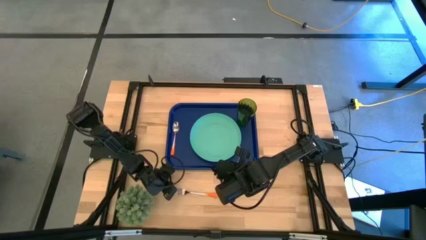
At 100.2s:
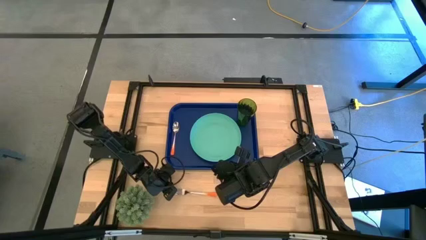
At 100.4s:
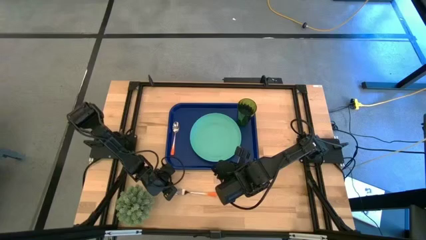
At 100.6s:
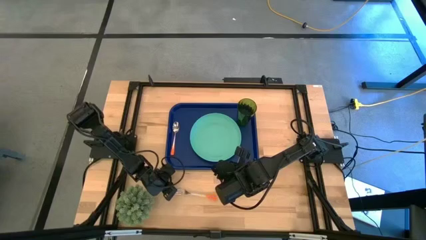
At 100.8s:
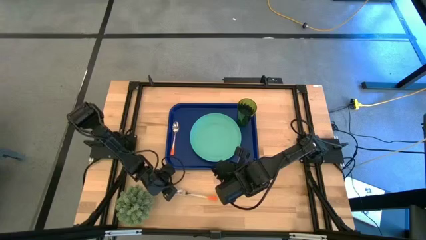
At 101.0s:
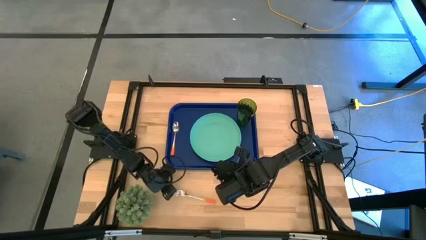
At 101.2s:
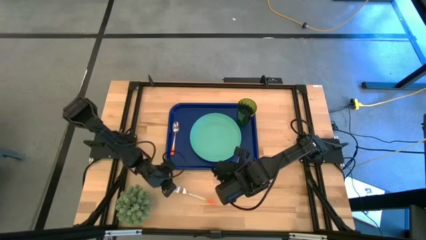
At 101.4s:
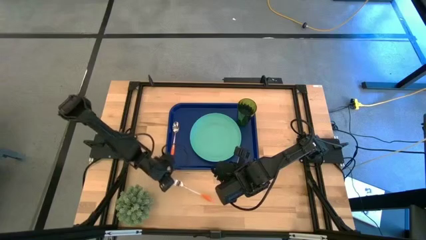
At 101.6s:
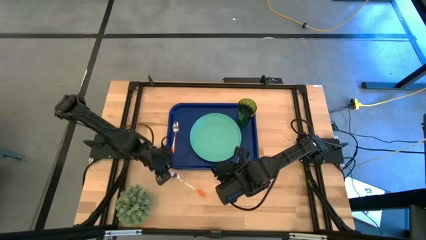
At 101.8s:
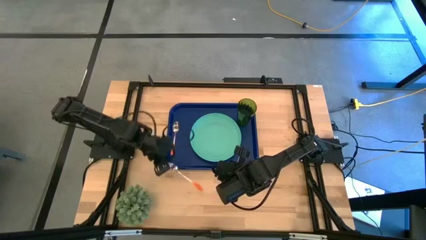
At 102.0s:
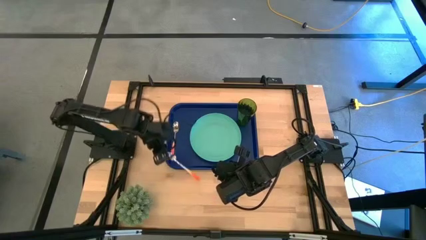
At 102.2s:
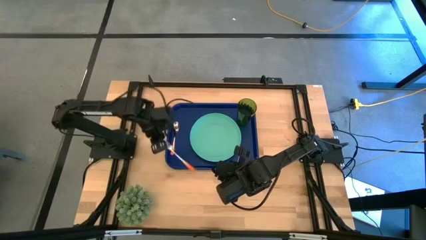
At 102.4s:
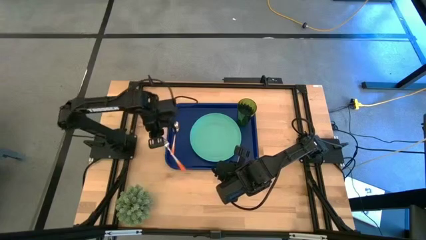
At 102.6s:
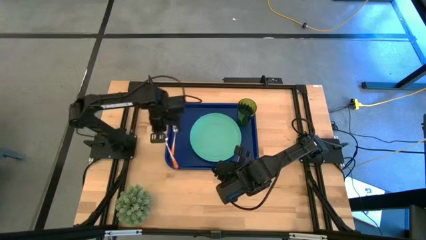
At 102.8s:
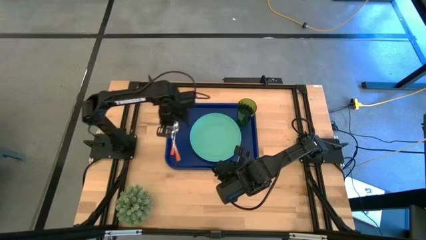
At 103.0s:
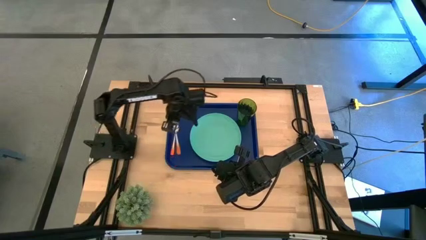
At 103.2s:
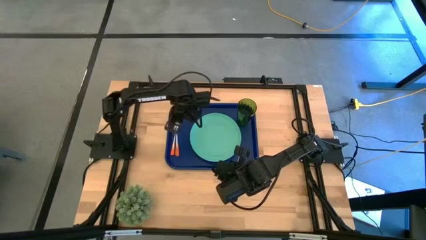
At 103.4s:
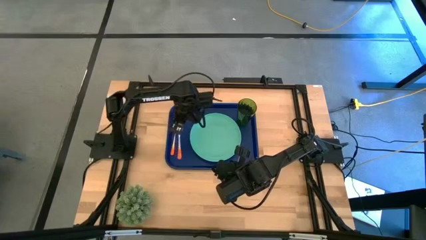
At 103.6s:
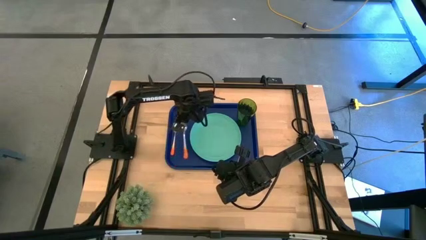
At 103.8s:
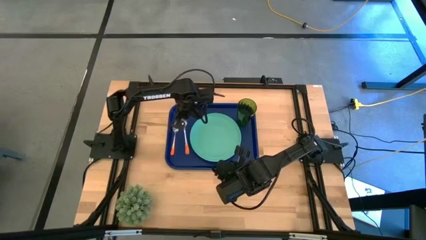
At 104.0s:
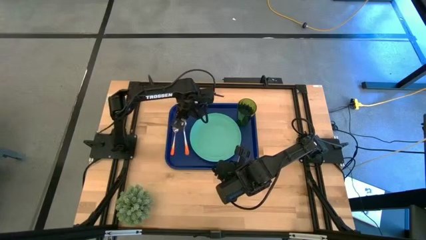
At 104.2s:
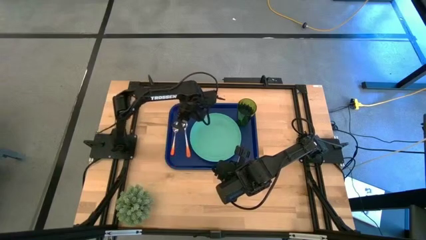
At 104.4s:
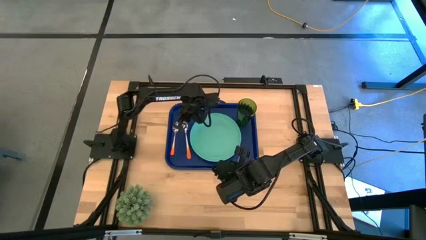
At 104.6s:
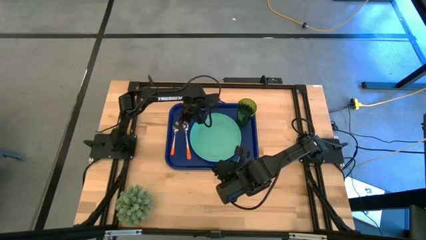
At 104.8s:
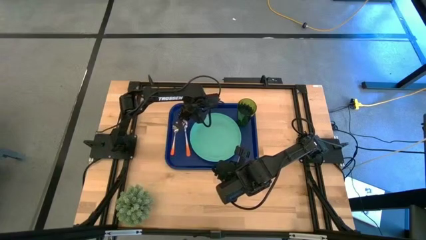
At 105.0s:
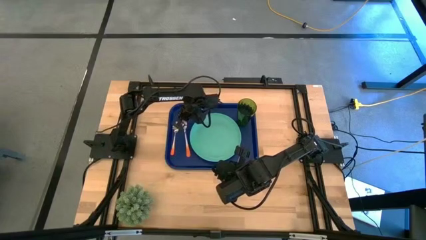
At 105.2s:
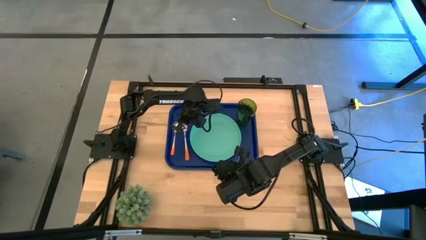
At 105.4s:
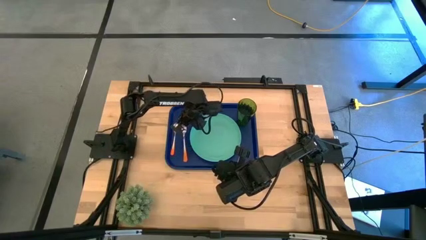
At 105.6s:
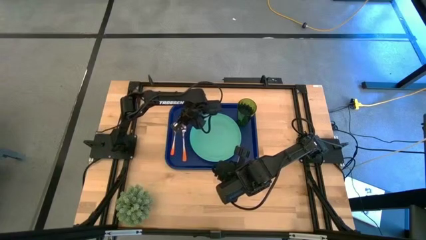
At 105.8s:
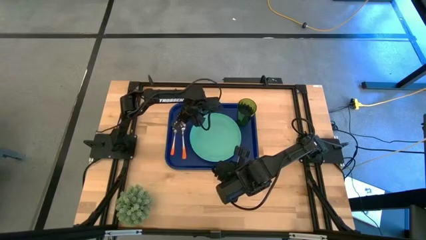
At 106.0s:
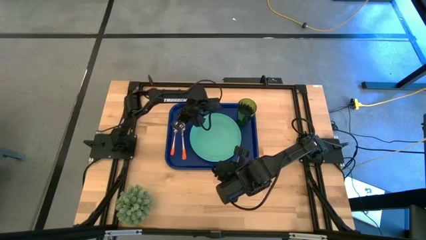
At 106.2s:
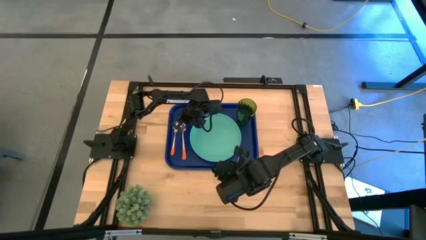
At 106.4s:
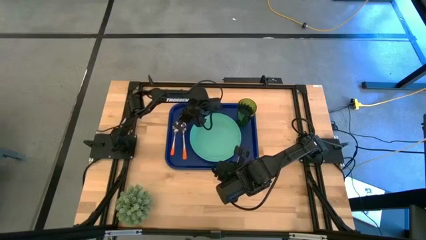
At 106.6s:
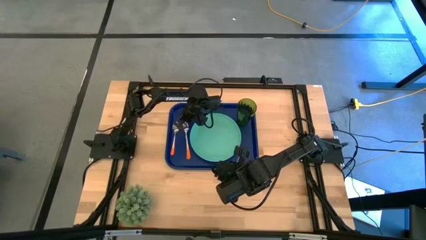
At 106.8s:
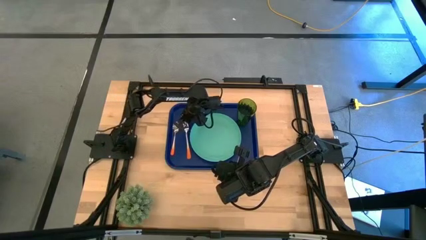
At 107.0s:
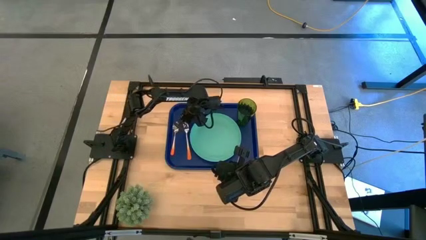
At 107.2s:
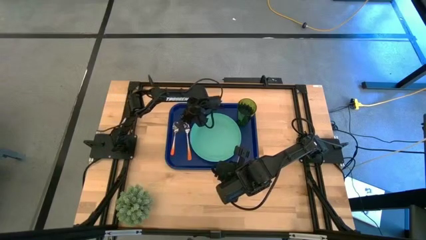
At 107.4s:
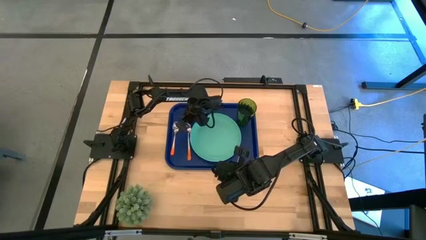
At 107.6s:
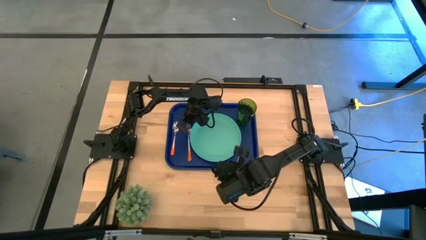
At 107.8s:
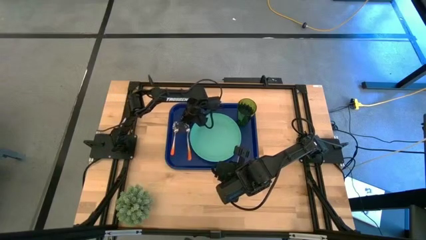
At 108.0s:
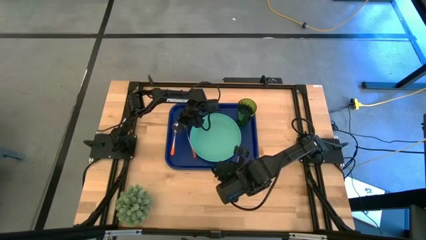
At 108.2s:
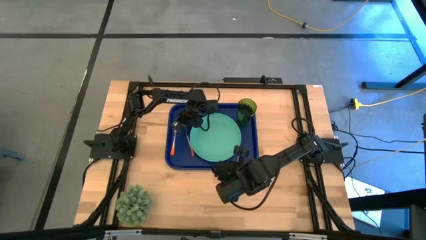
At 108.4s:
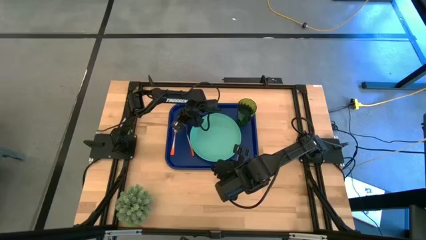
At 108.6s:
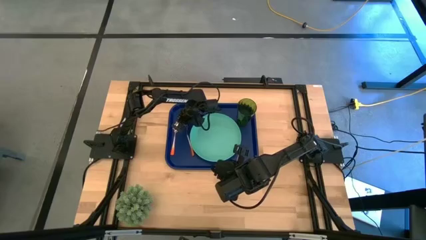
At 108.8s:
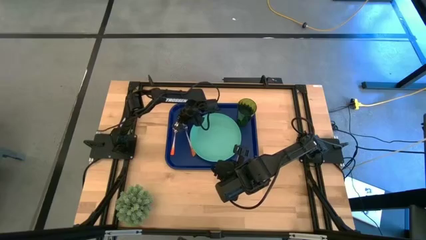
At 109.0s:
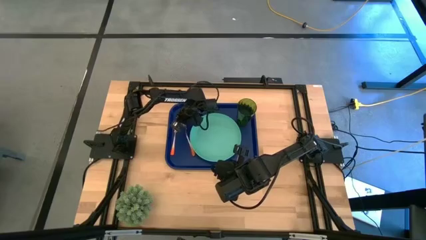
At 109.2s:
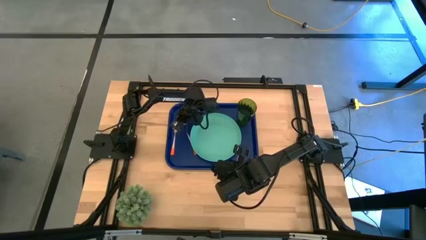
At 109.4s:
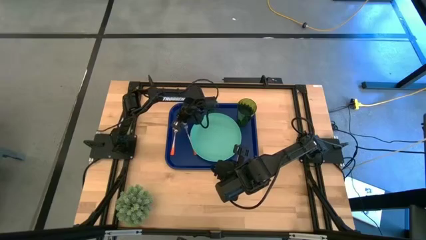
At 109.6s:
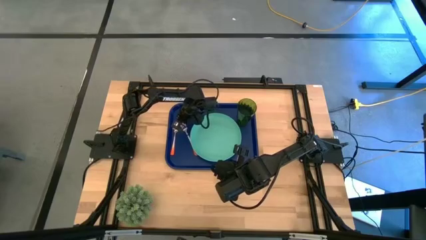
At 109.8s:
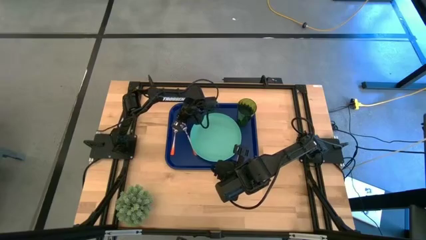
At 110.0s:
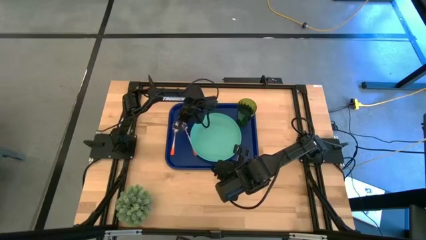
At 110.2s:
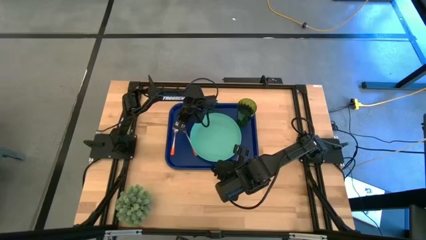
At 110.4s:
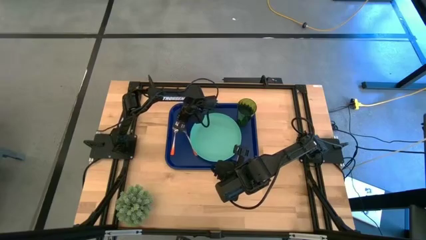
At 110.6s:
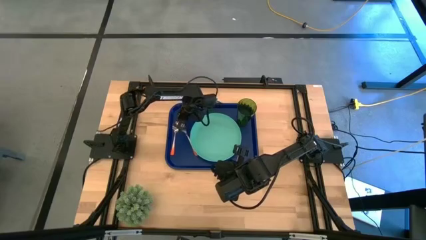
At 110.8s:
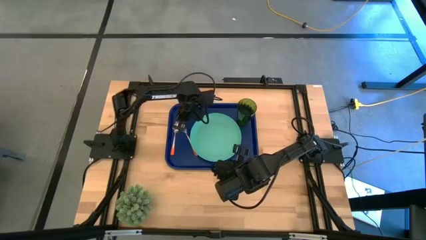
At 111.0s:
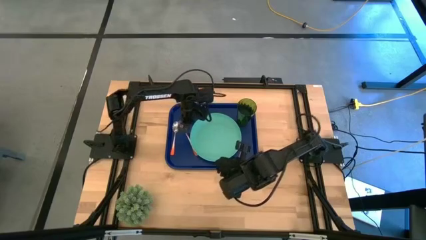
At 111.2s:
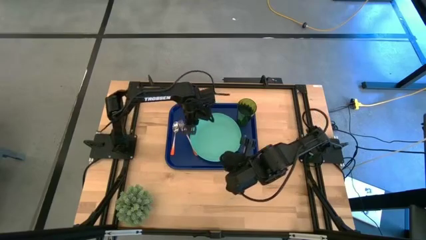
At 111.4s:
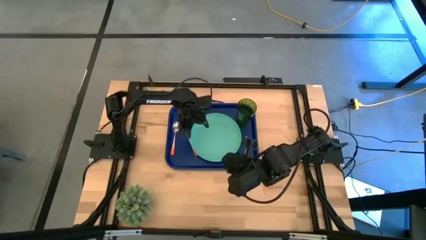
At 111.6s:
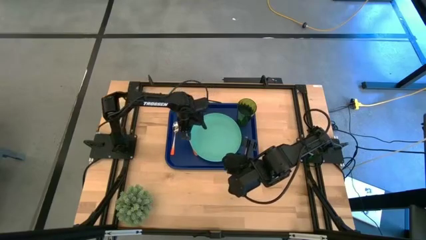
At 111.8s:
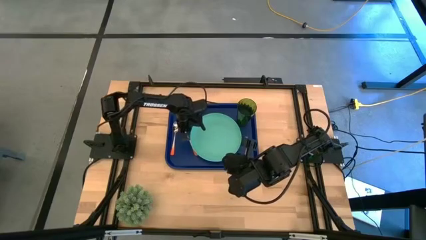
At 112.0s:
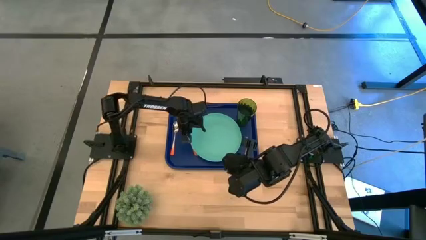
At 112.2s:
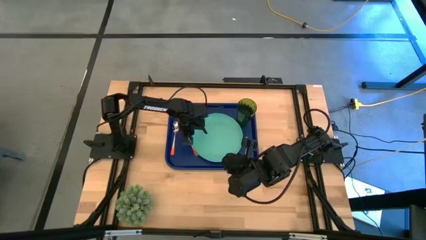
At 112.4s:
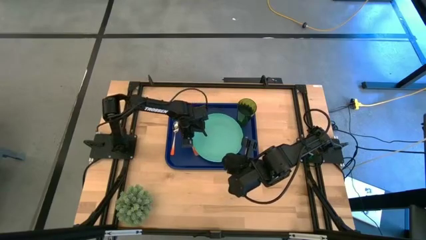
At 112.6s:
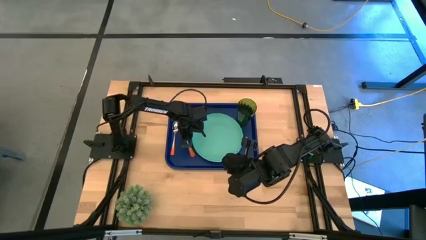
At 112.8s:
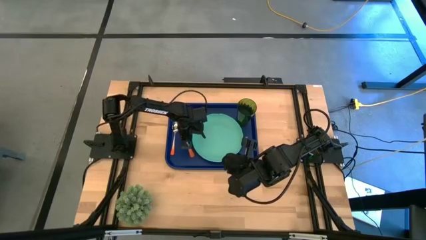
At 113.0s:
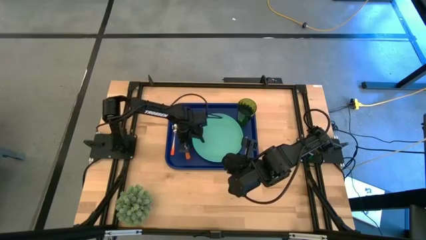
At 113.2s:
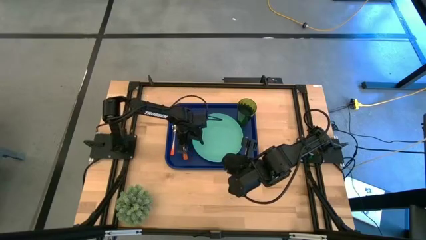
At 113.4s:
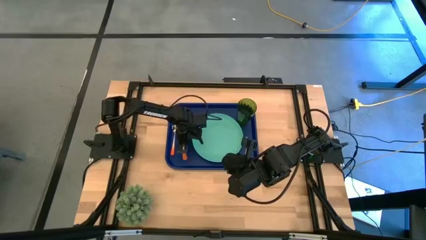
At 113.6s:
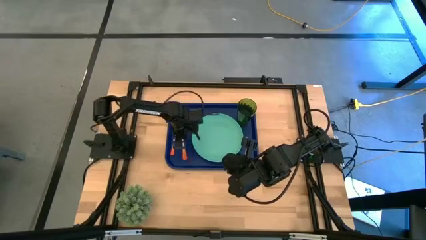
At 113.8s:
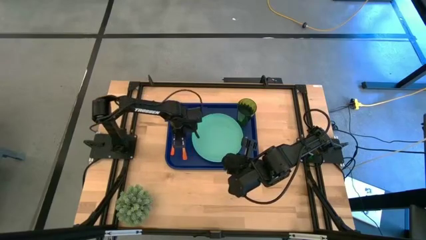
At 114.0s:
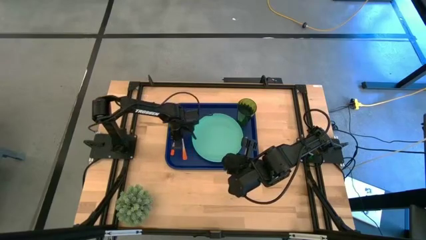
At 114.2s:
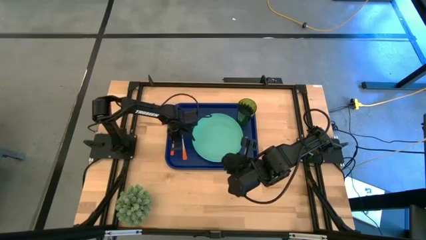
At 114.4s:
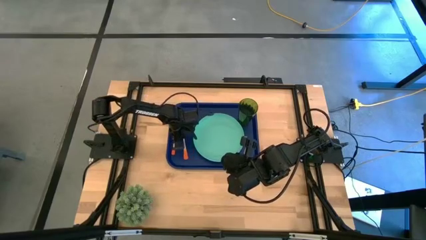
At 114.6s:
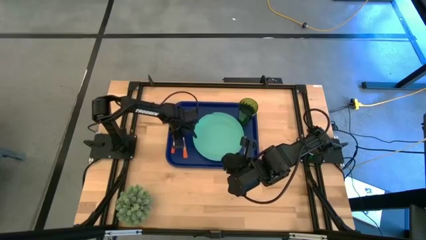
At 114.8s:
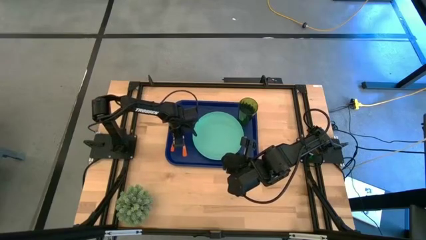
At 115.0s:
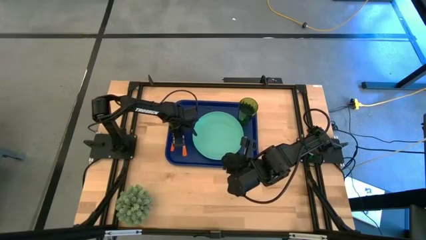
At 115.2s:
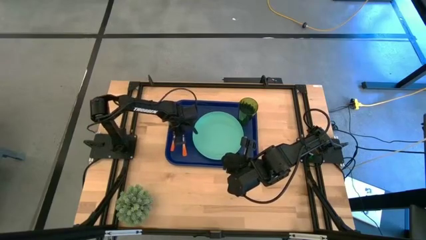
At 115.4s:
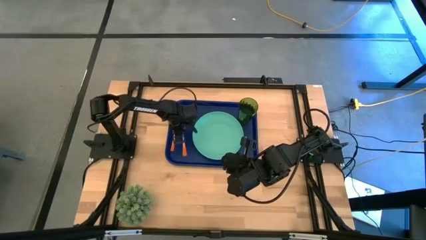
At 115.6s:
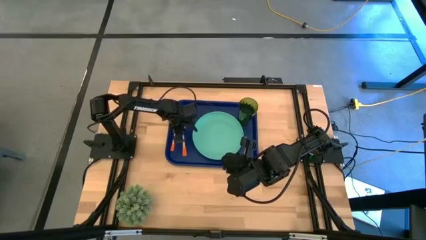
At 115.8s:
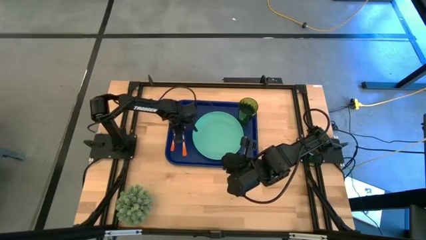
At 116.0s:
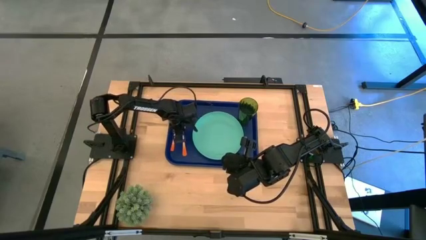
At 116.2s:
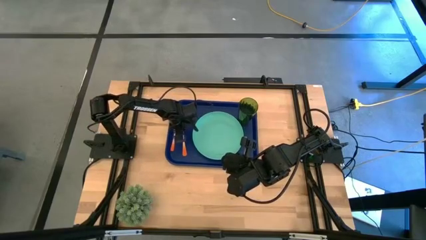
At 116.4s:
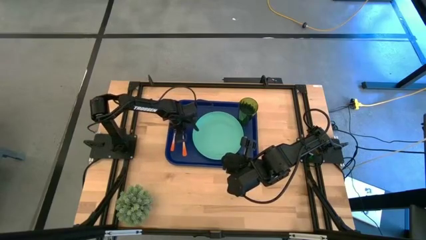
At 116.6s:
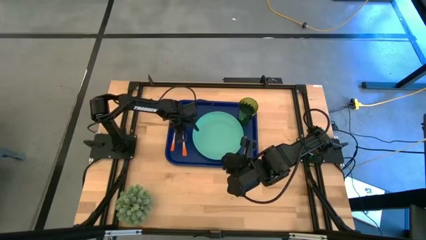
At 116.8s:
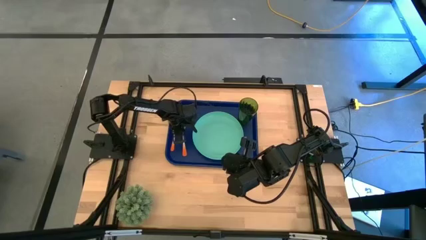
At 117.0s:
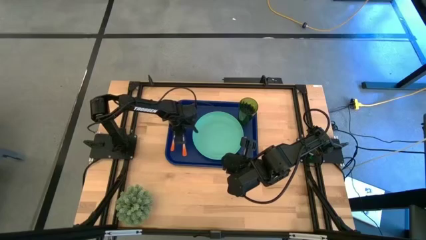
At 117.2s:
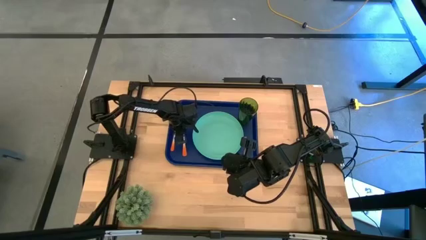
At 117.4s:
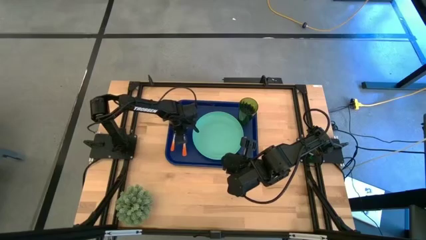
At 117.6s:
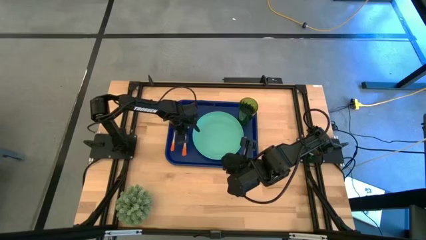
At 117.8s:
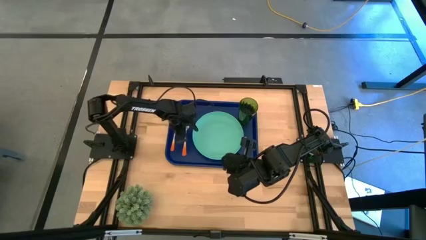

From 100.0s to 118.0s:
Task: Pick and place plate/cup/fork/spoon on tray
Put the orange fork on the blue serving tray to the left side of the green plate
